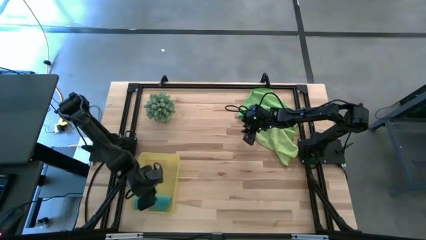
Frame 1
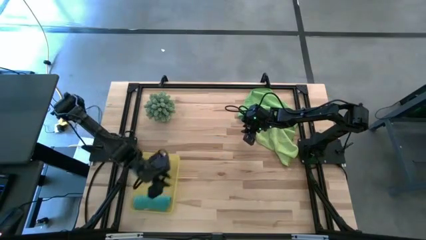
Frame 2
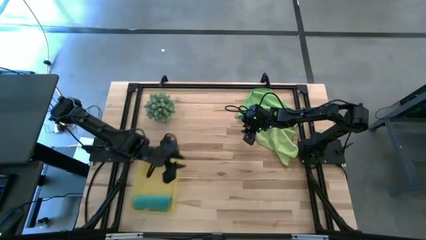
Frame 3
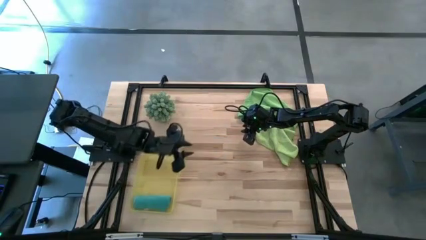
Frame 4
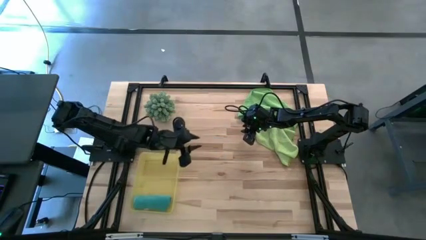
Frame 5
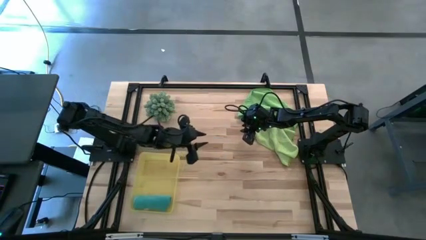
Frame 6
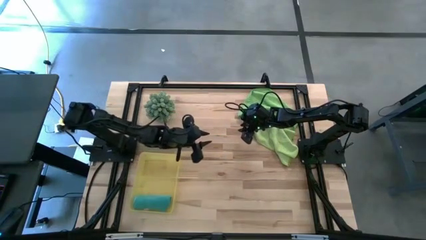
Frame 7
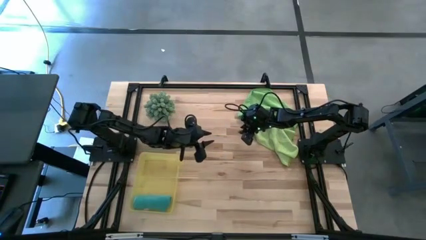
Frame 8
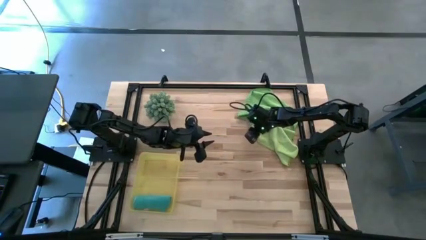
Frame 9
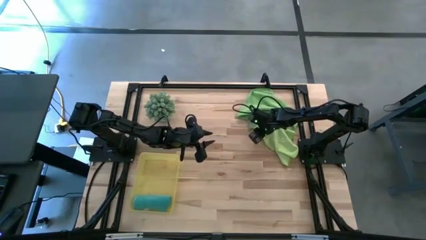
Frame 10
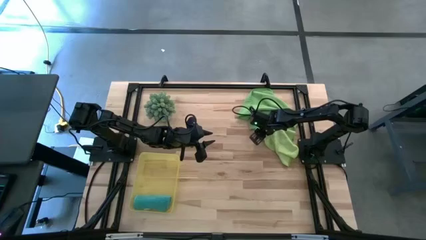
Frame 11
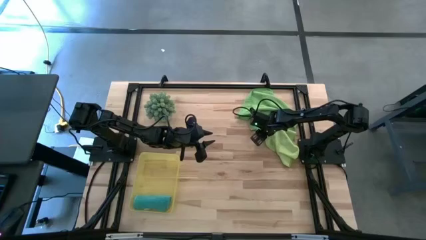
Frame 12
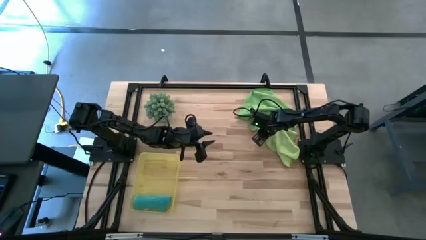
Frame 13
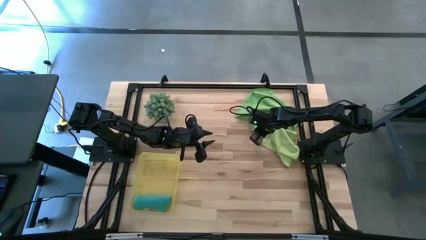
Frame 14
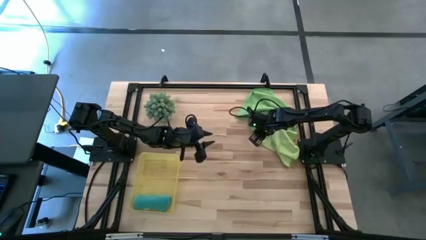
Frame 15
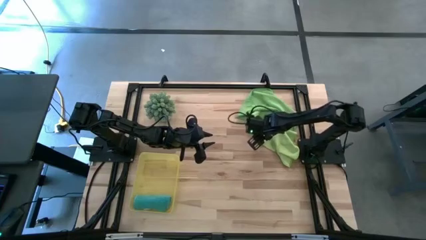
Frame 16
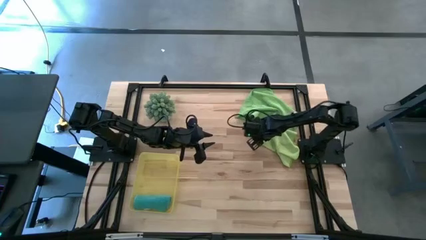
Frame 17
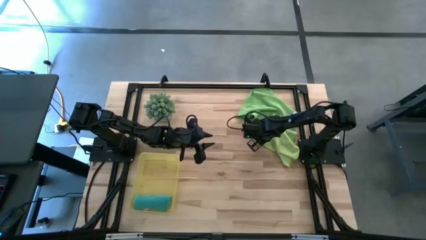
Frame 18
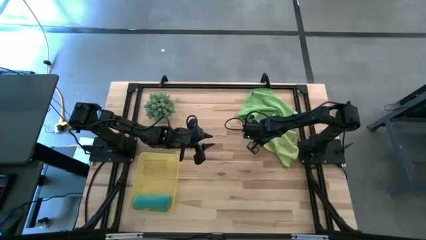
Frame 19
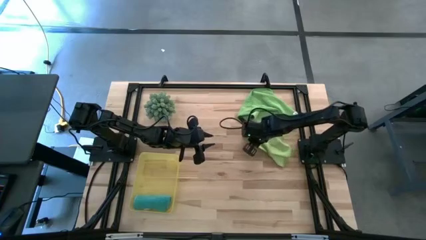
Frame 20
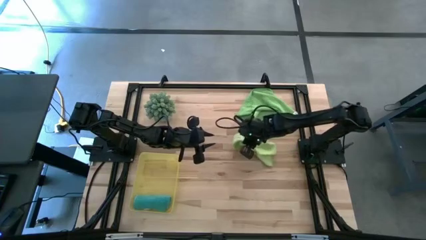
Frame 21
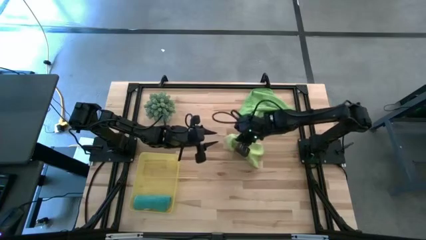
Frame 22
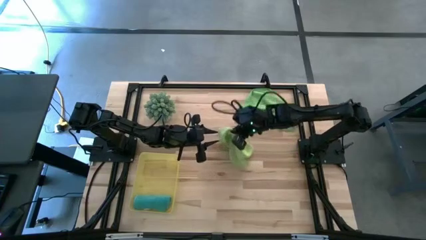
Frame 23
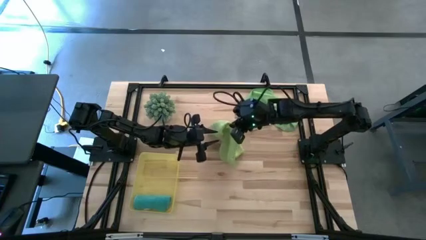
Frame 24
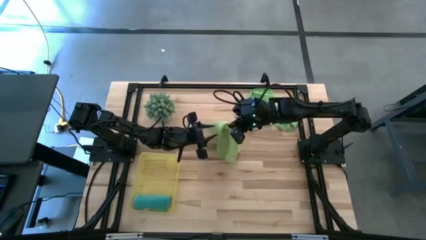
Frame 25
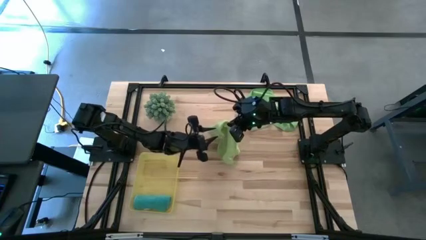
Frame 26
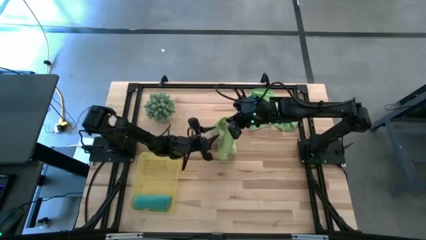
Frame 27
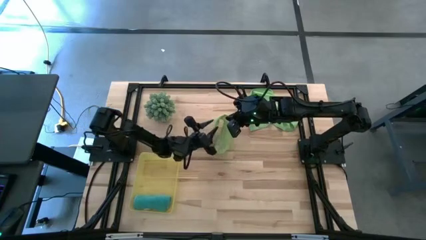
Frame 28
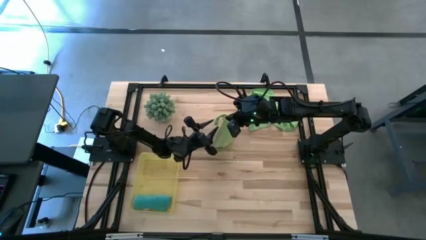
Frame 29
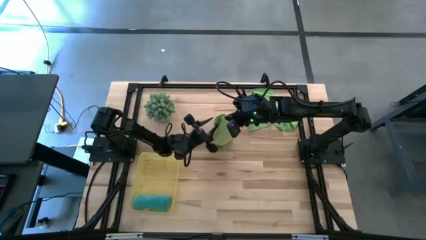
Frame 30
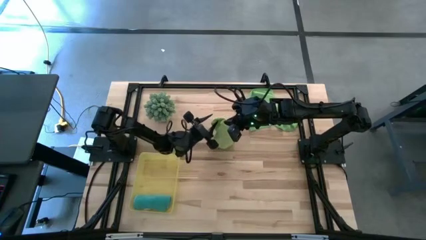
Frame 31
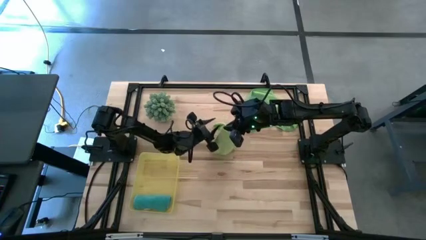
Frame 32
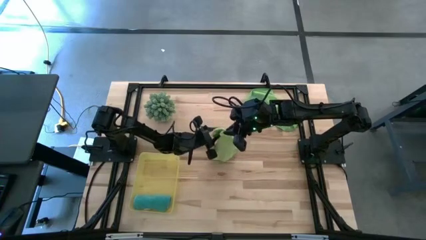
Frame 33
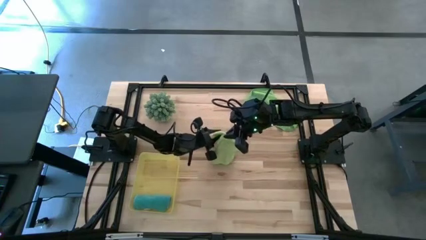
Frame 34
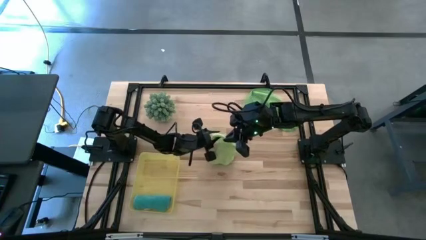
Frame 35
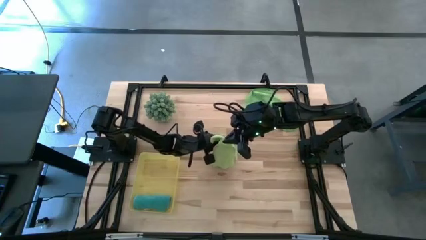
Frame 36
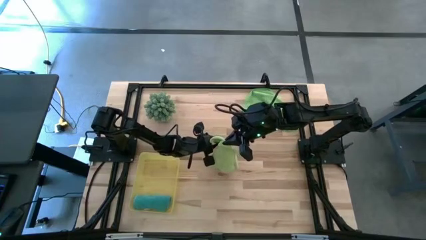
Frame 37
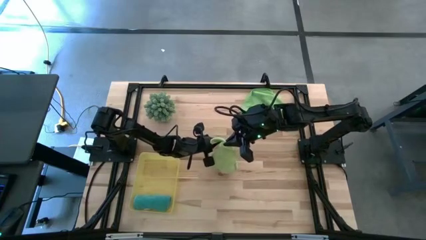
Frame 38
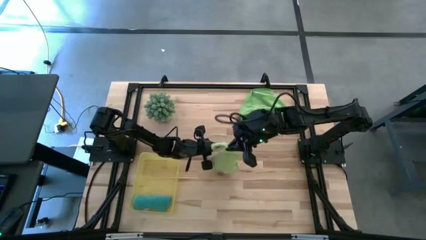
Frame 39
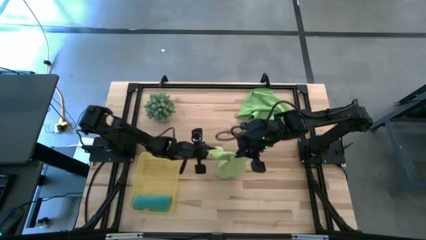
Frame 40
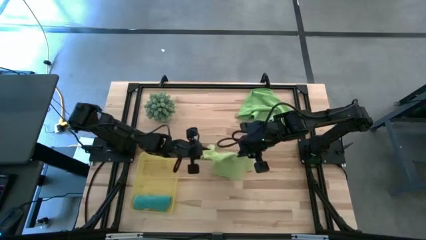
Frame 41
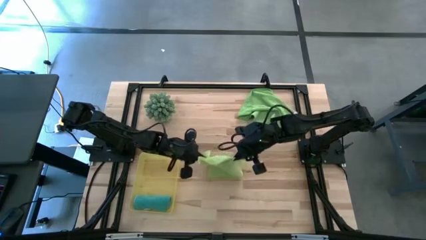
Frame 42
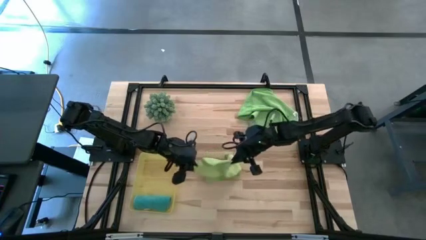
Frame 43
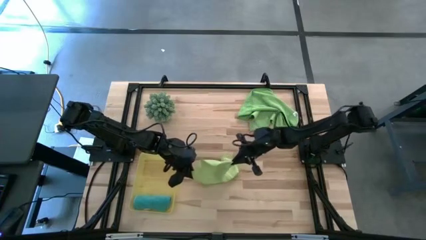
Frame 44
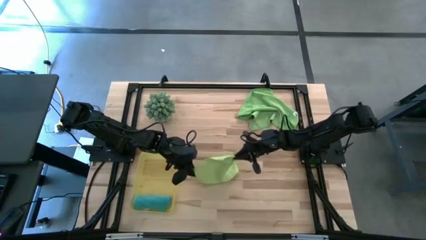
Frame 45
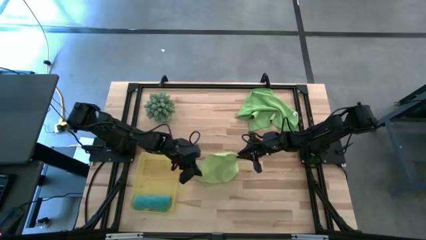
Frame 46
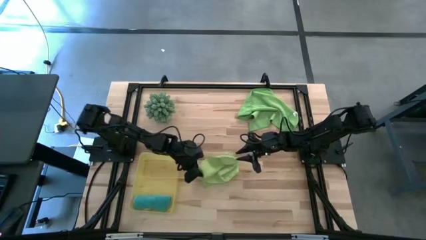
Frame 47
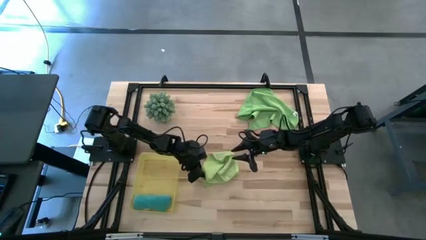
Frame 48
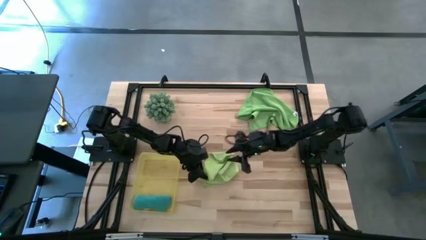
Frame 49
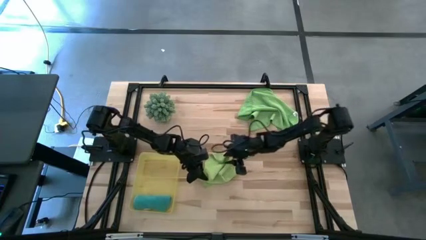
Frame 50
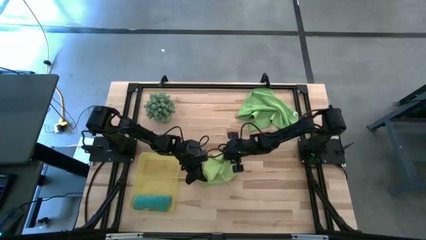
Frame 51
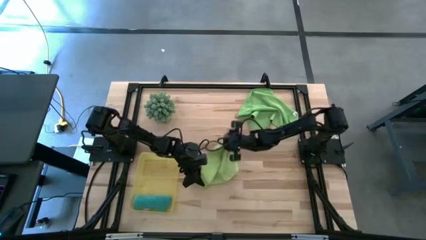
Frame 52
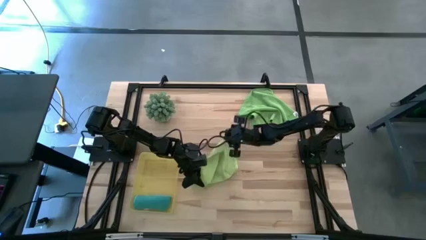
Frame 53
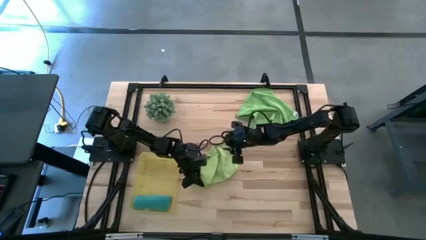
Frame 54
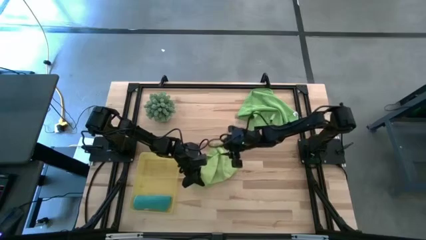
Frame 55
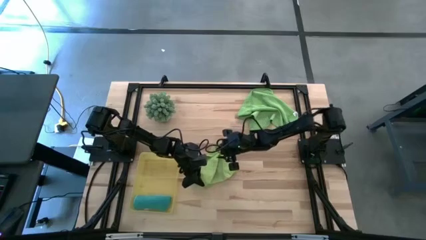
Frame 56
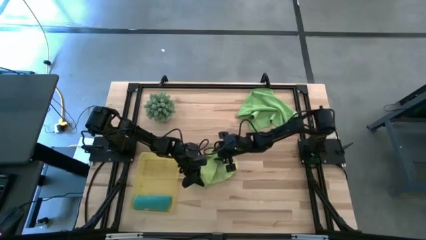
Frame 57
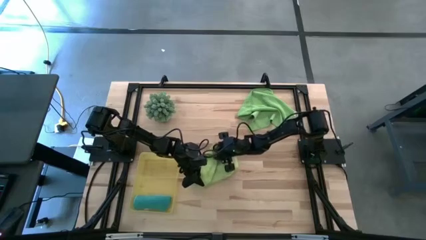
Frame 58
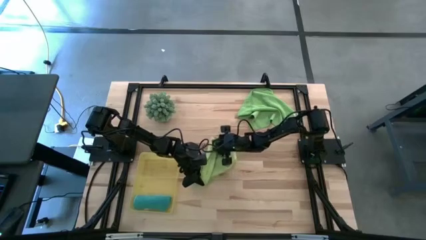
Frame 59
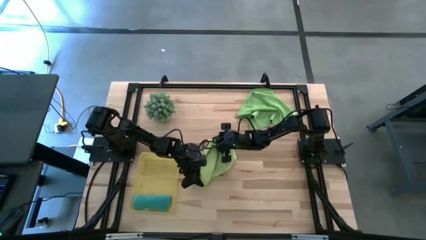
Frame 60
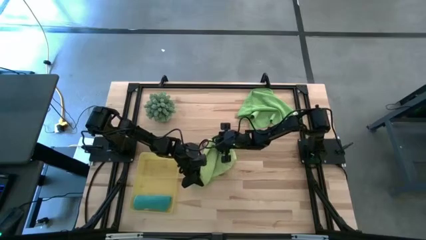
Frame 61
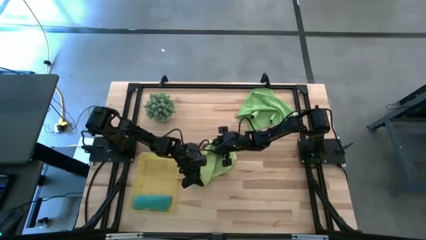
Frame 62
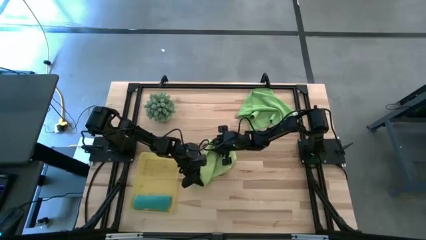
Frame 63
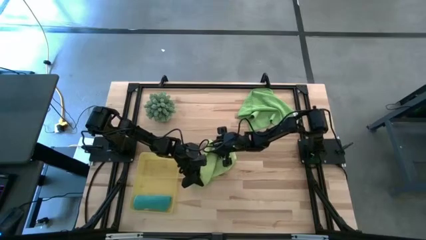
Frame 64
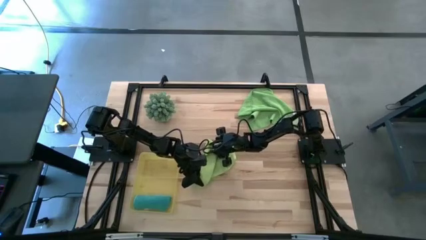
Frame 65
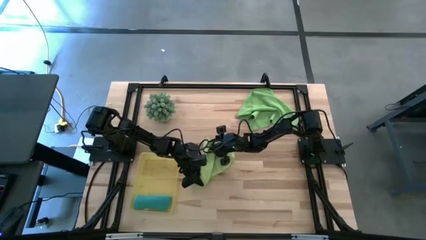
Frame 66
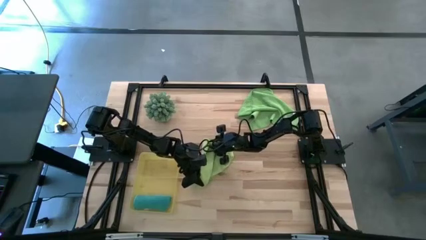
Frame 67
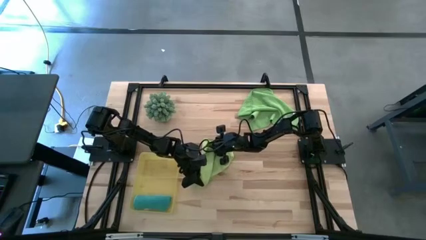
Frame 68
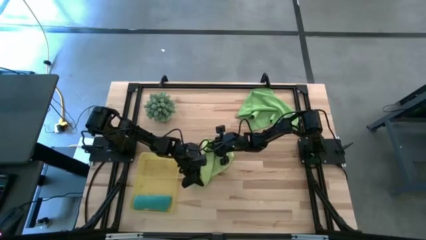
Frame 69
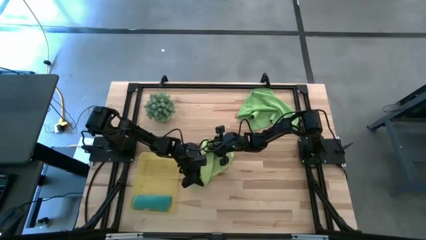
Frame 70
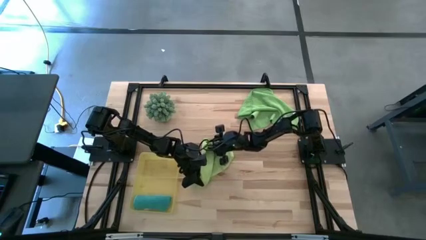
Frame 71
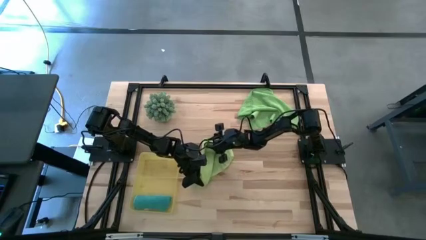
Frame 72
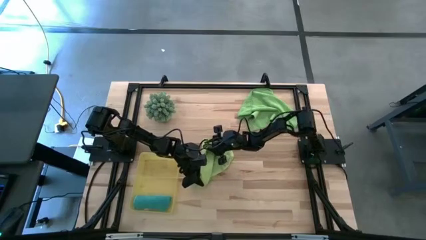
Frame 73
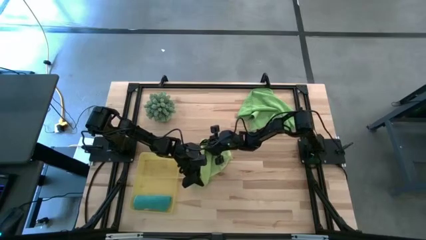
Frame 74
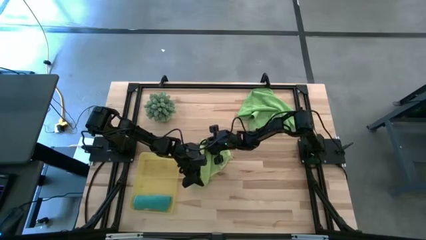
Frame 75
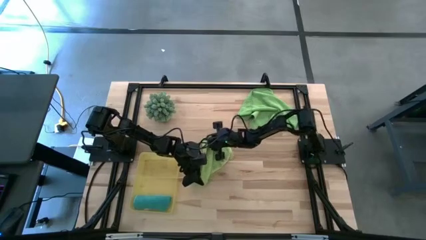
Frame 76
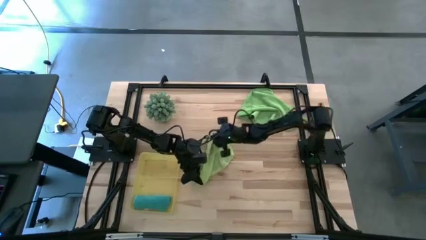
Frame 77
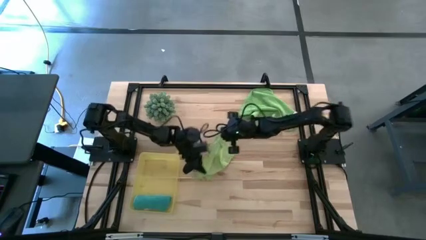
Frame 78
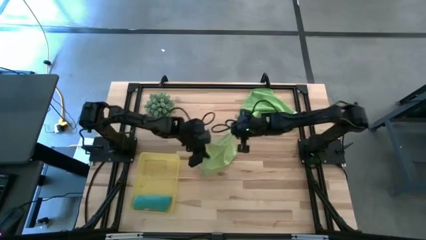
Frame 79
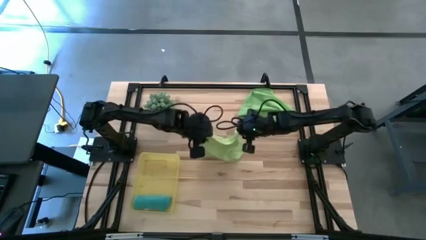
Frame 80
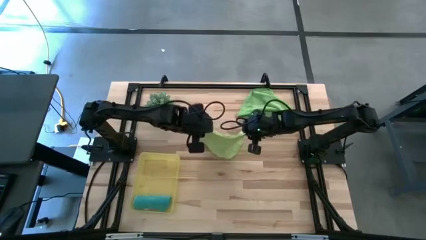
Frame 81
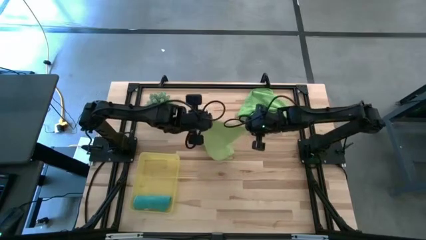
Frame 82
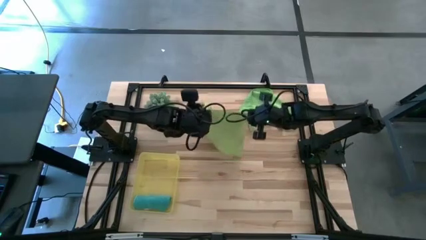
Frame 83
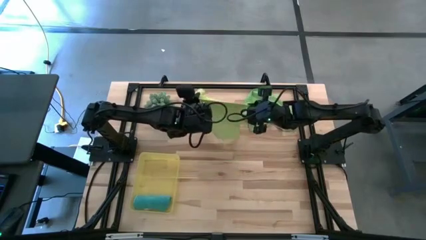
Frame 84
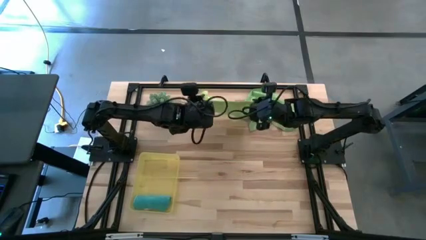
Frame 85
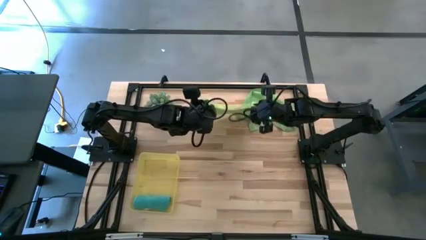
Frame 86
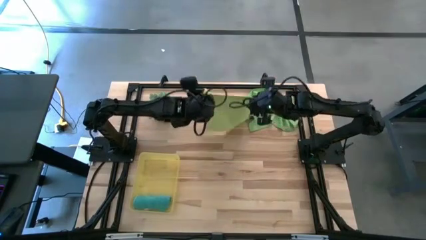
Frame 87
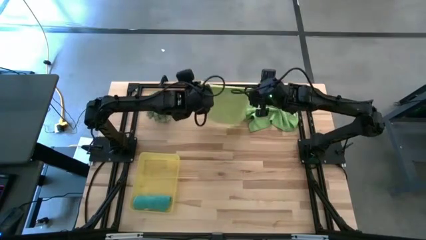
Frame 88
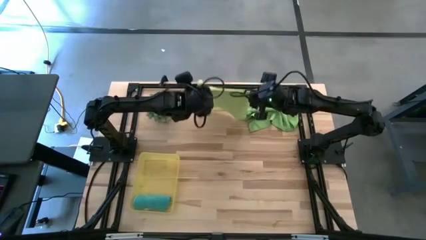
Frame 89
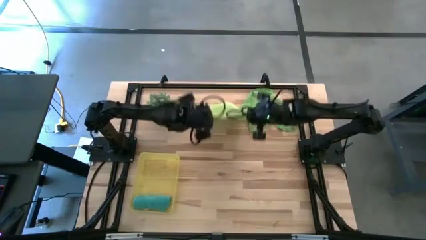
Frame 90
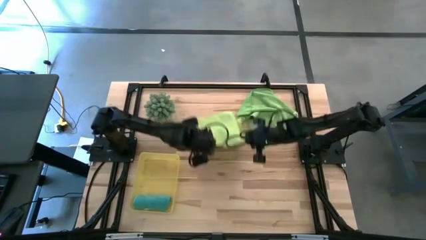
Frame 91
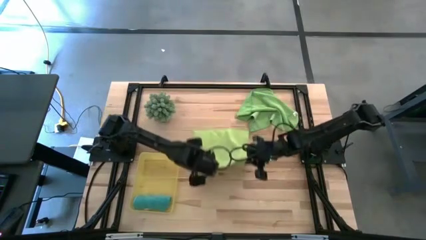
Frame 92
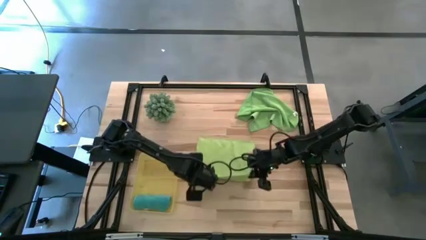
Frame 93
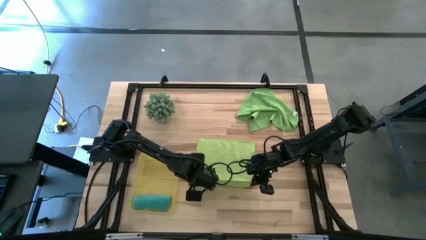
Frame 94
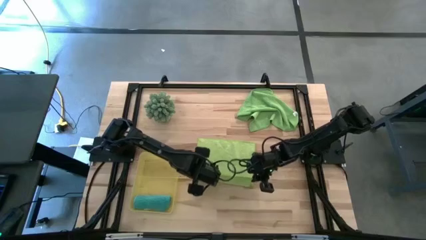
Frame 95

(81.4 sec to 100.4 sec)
Task: Roll microfiber towels into tight, uniform cylinder then place into a basket
Fold the light green towel
